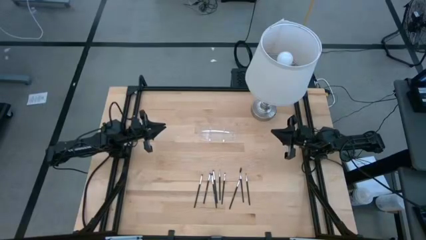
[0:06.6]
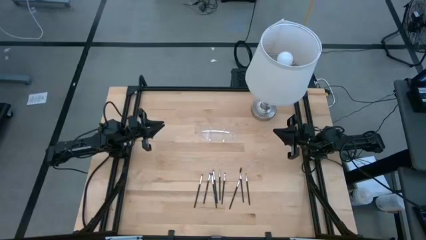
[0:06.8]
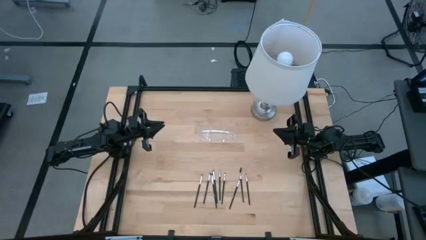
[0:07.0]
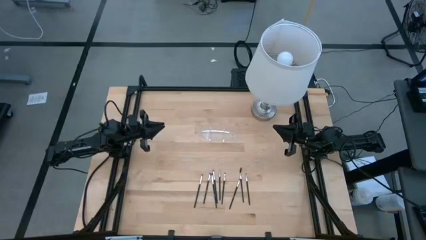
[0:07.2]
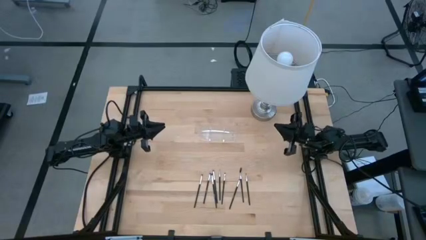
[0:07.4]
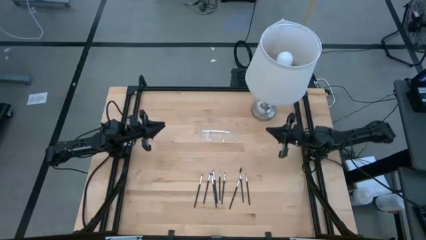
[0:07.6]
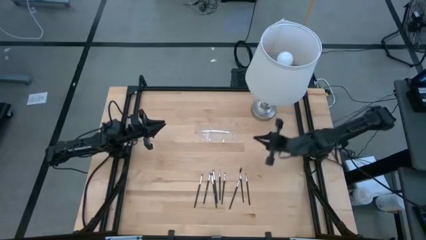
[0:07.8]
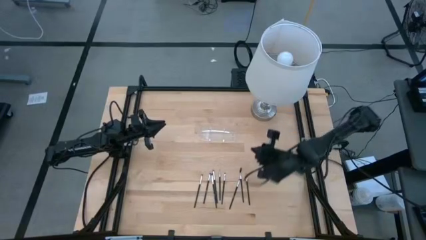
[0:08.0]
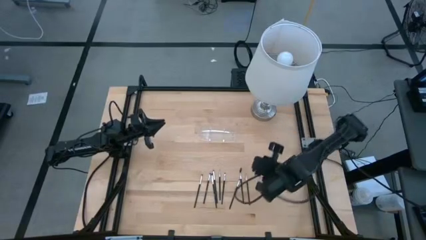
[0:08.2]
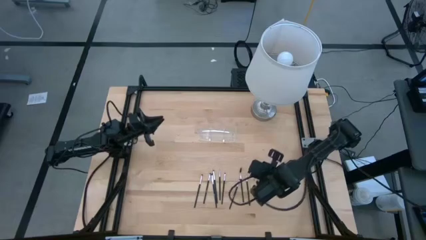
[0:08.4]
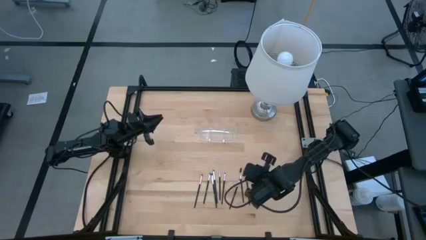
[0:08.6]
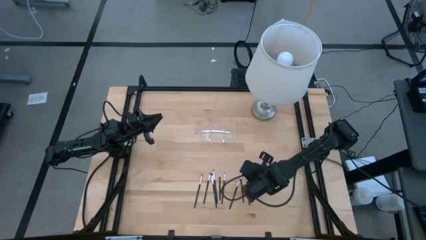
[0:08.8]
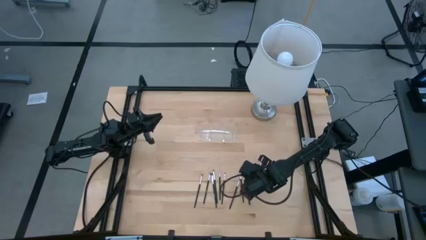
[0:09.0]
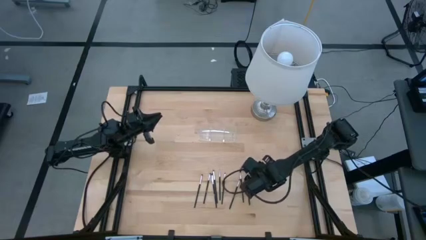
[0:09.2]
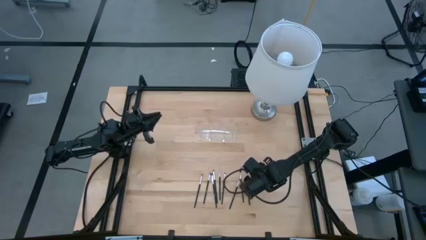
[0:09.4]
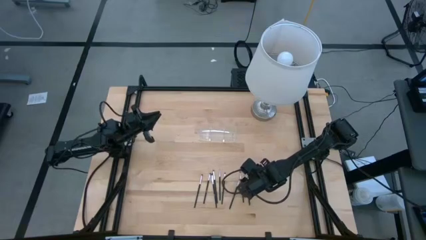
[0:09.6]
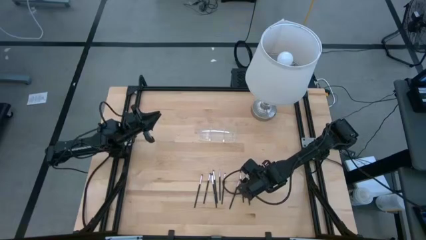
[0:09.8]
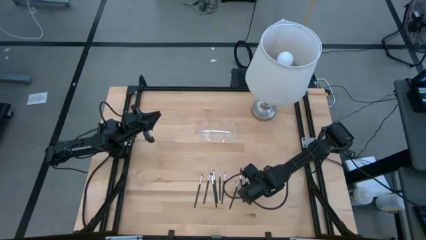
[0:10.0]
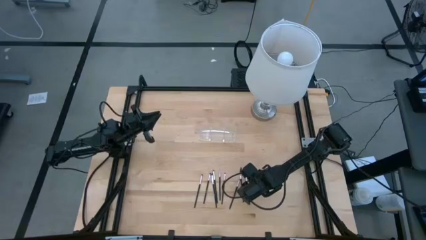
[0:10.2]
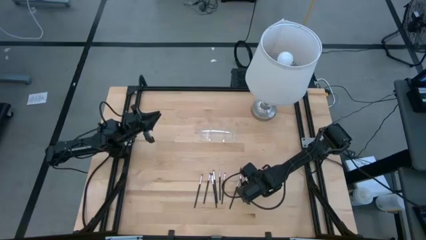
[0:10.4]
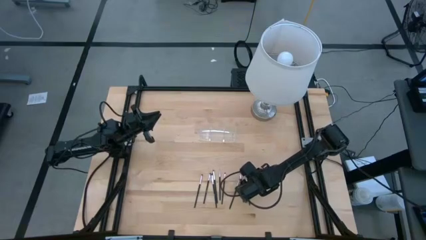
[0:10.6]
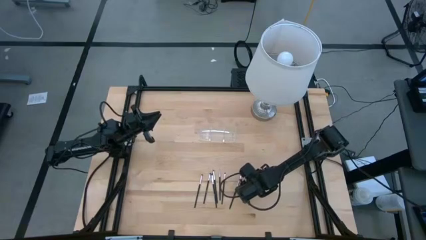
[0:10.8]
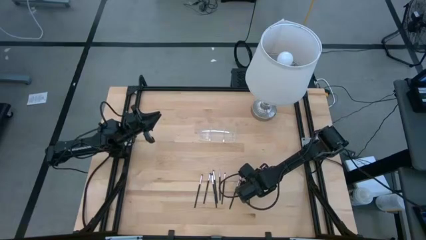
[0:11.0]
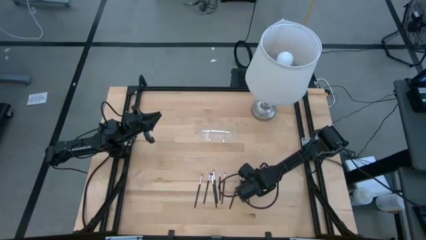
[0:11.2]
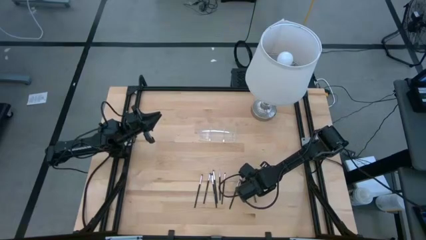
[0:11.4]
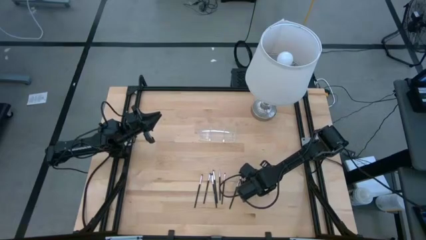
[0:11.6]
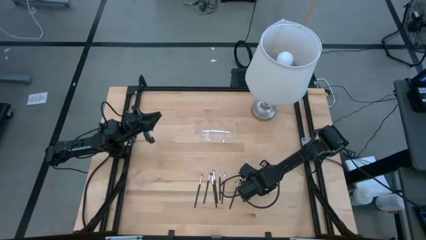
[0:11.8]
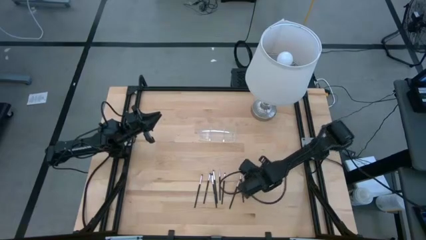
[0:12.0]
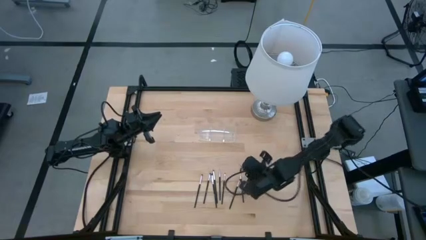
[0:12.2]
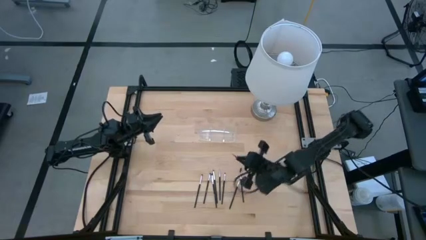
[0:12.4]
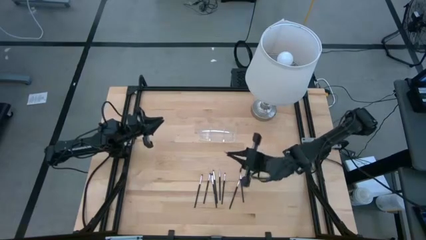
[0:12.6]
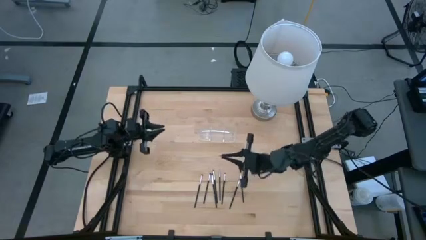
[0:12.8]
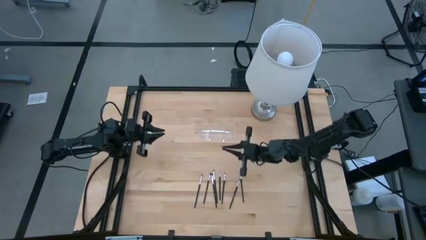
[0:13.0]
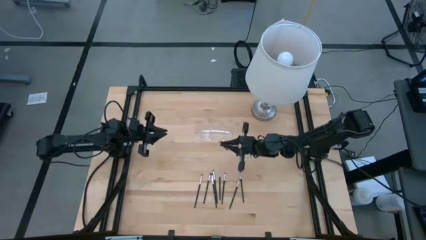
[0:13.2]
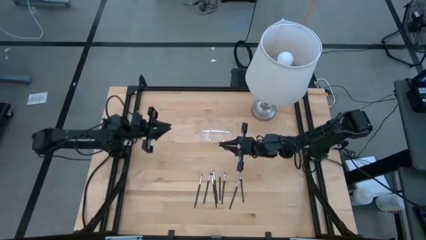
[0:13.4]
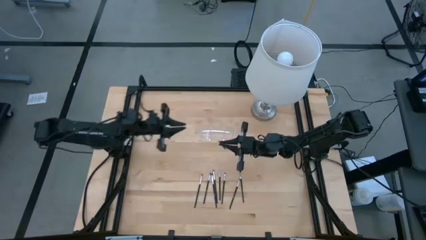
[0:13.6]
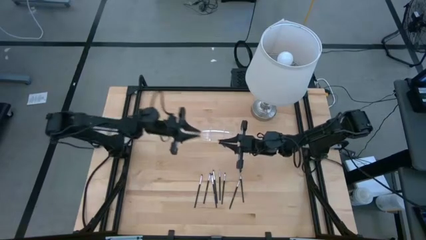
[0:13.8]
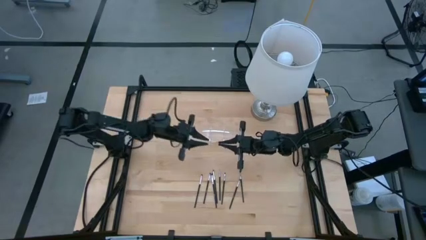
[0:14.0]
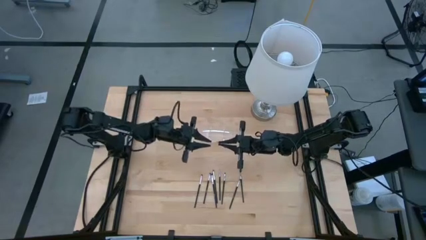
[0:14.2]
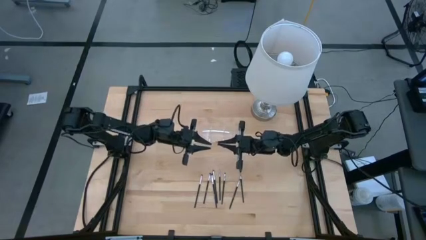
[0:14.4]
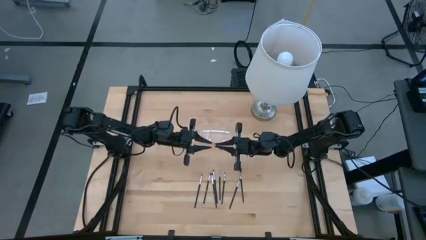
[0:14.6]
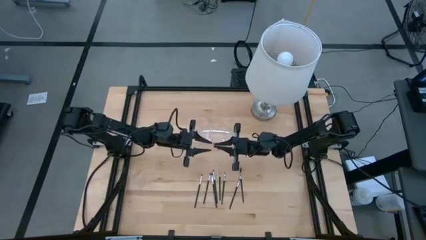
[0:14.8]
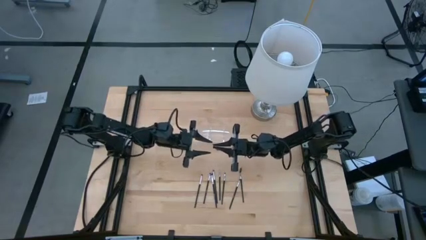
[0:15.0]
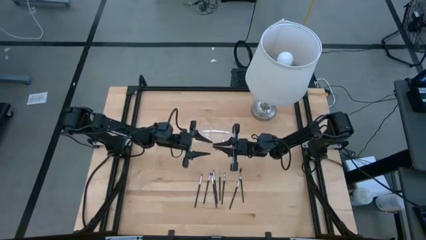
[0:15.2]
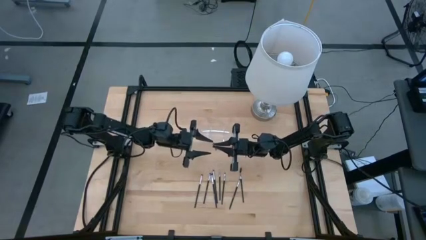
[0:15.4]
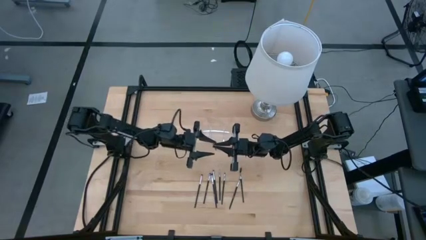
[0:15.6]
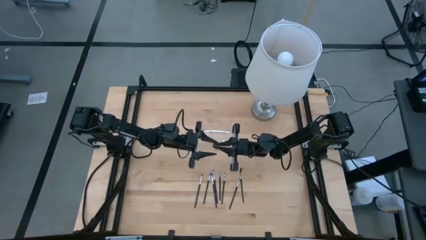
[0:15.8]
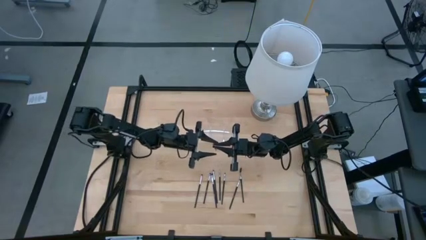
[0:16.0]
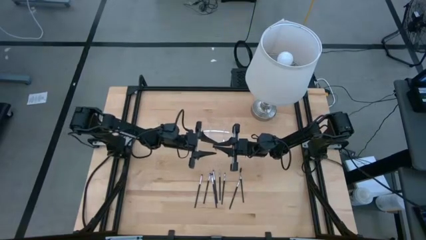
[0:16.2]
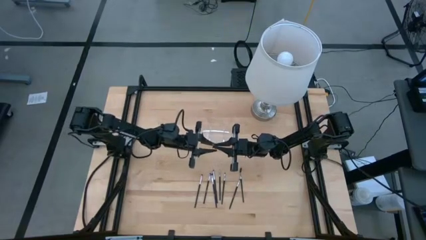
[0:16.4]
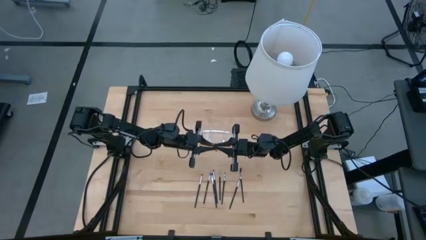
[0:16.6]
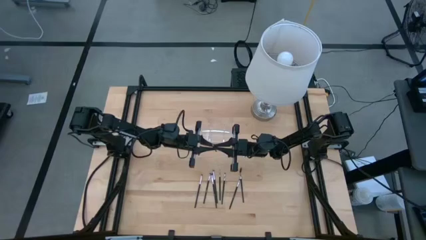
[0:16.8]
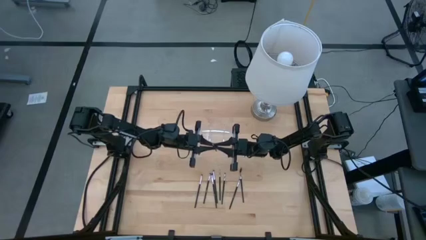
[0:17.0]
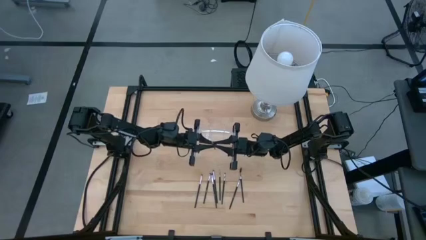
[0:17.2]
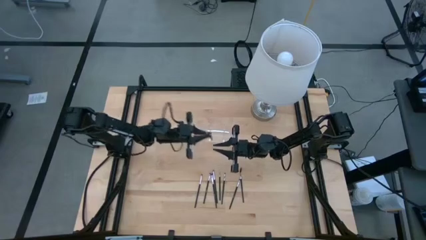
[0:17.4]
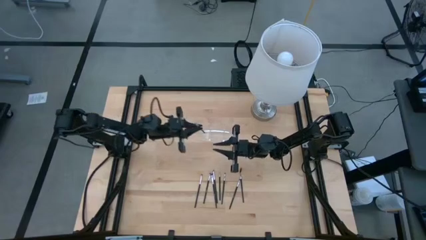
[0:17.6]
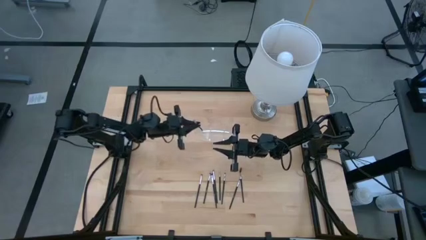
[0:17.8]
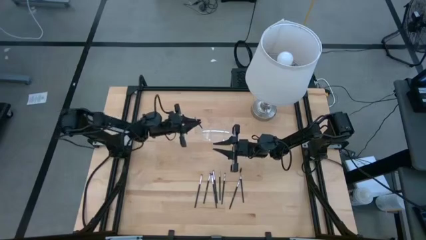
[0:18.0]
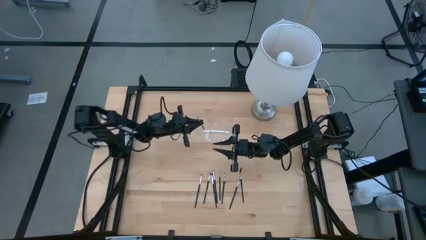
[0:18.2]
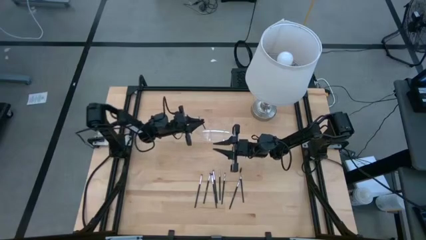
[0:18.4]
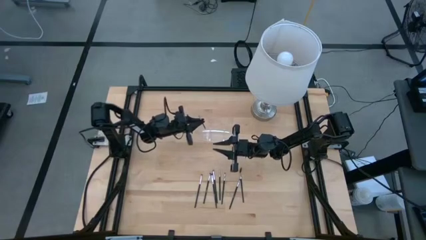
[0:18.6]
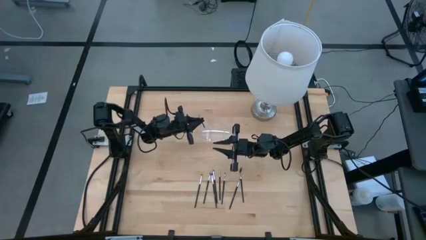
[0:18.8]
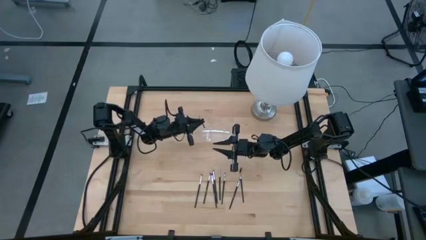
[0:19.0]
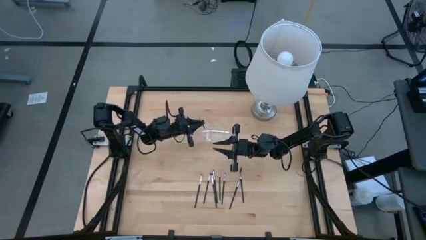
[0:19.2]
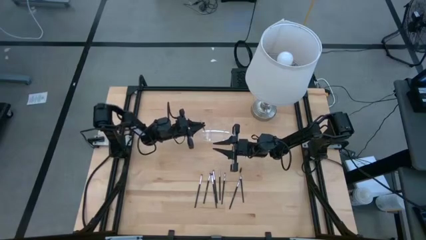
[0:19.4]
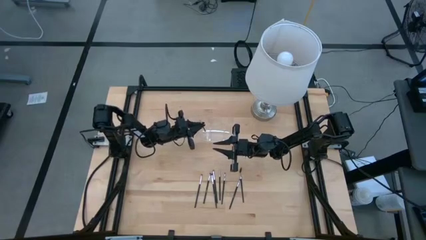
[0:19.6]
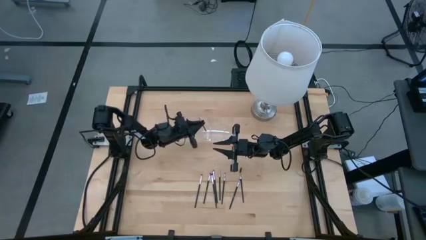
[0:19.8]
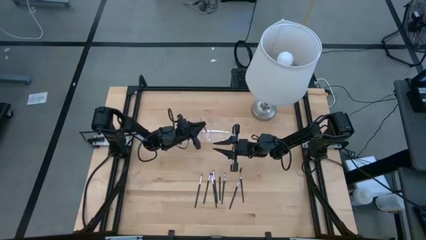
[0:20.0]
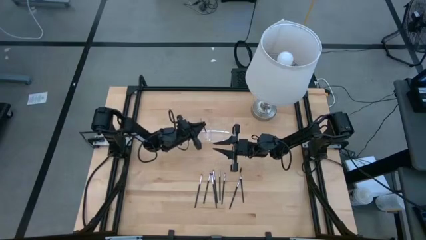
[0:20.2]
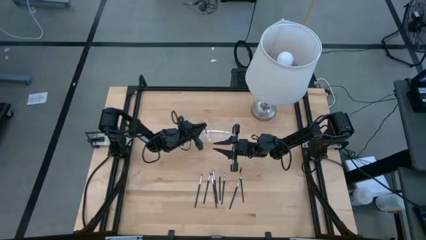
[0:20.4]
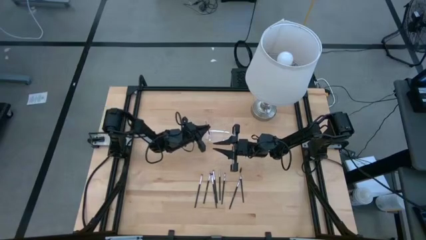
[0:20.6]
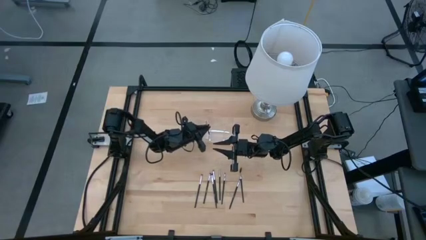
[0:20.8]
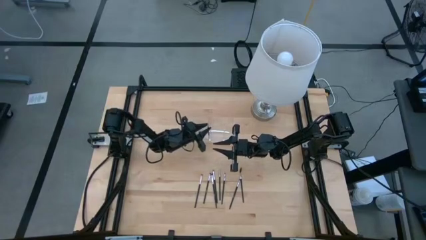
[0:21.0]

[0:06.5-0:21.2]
Task: Put items in baskets/containers
Put the black liner brush transparent organizer
